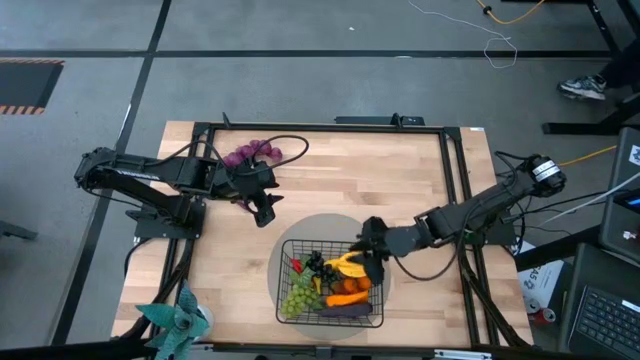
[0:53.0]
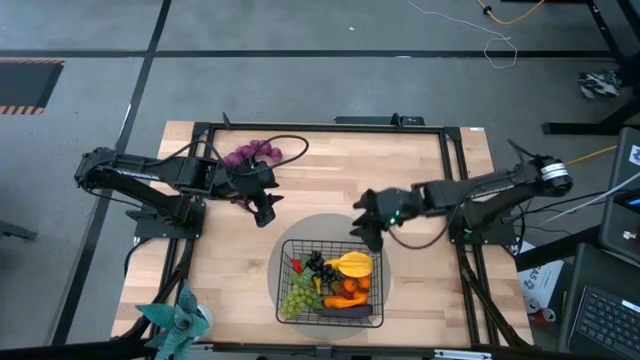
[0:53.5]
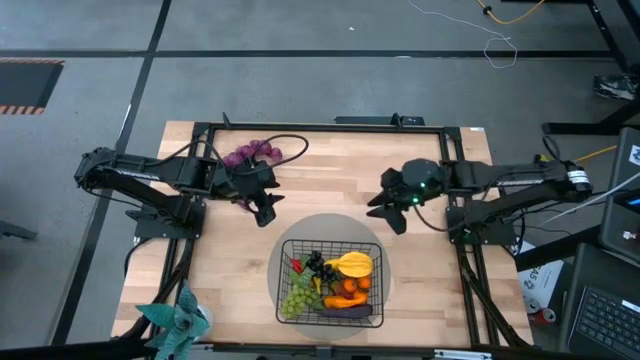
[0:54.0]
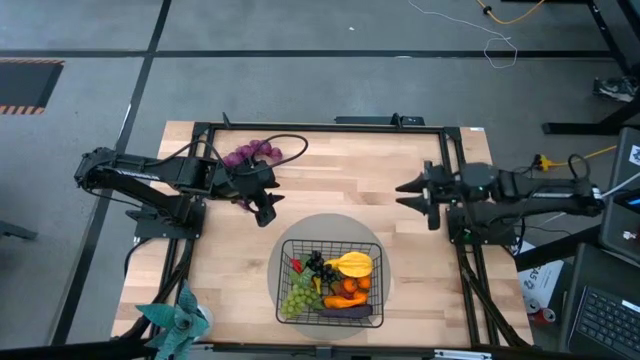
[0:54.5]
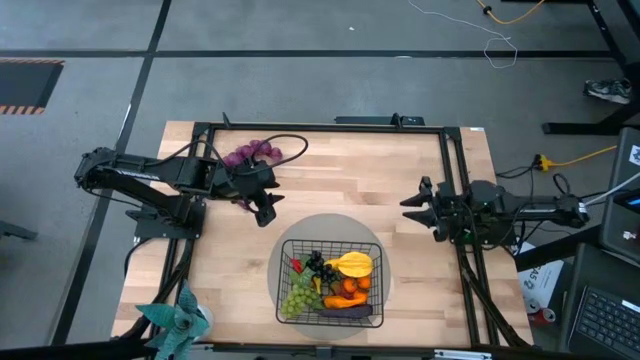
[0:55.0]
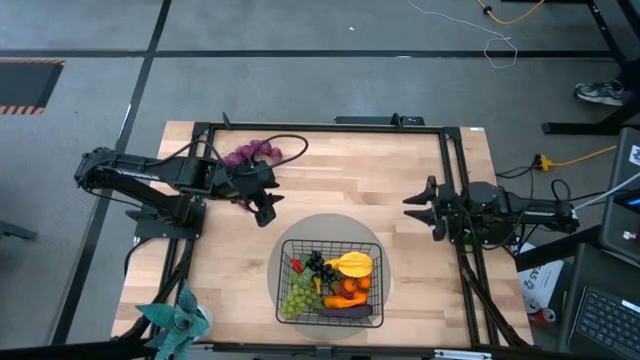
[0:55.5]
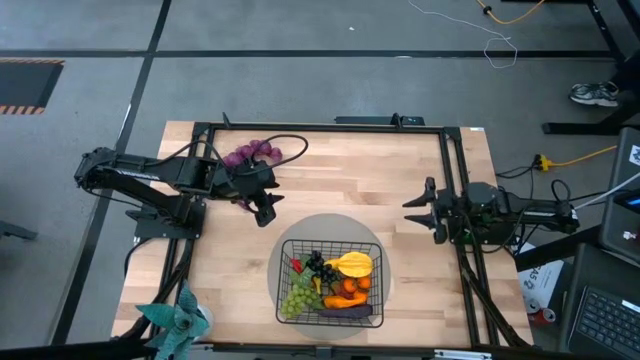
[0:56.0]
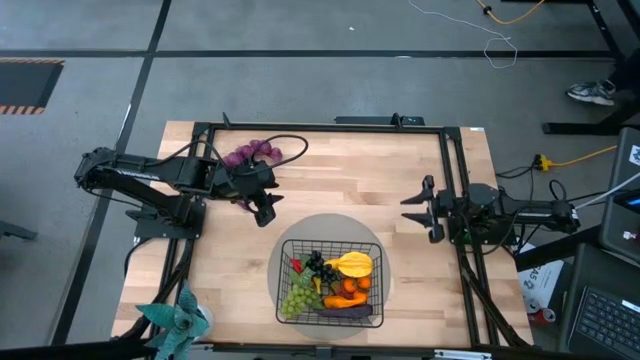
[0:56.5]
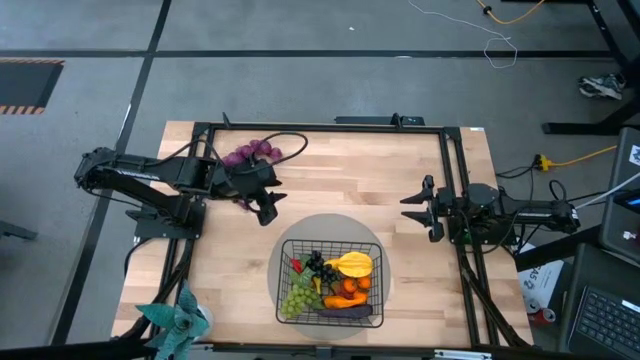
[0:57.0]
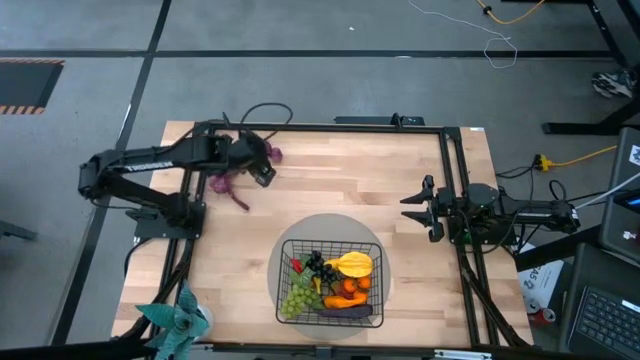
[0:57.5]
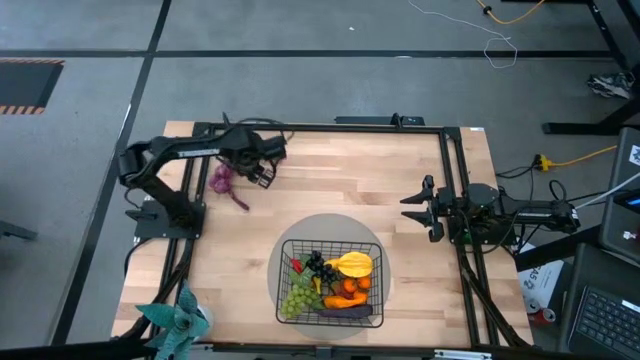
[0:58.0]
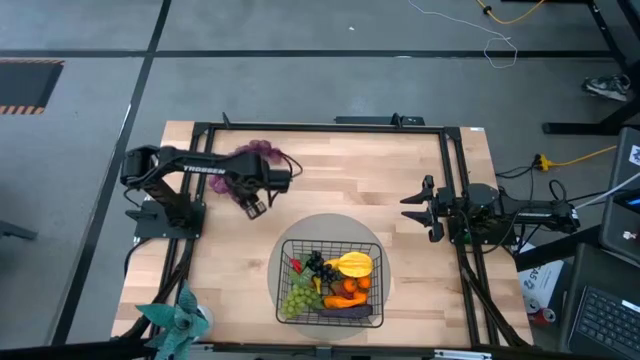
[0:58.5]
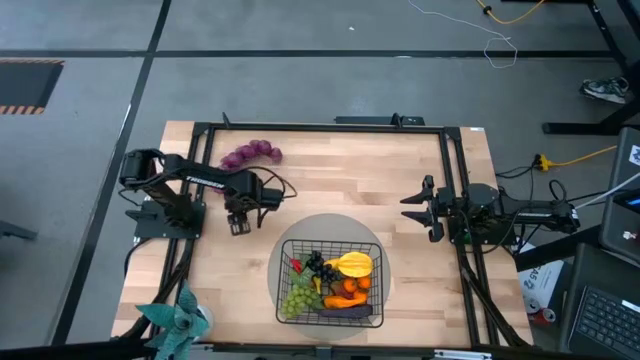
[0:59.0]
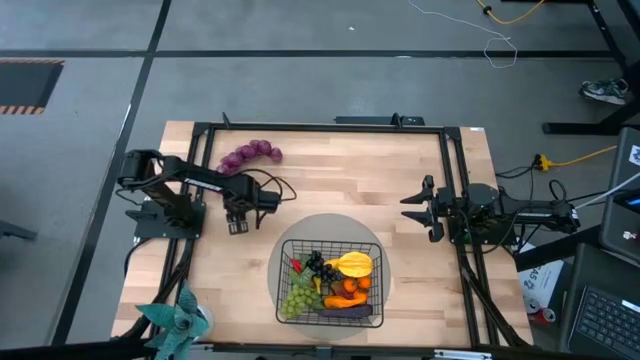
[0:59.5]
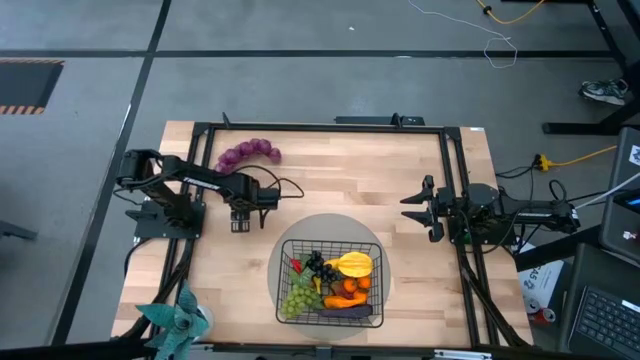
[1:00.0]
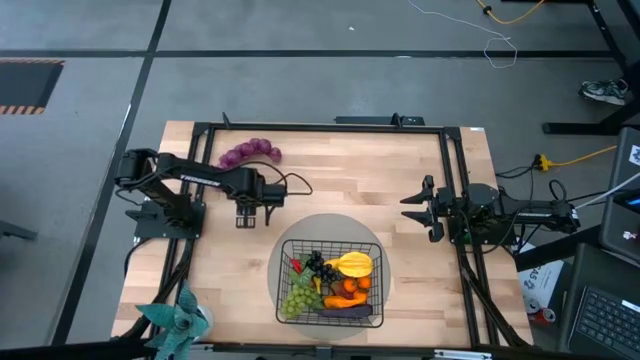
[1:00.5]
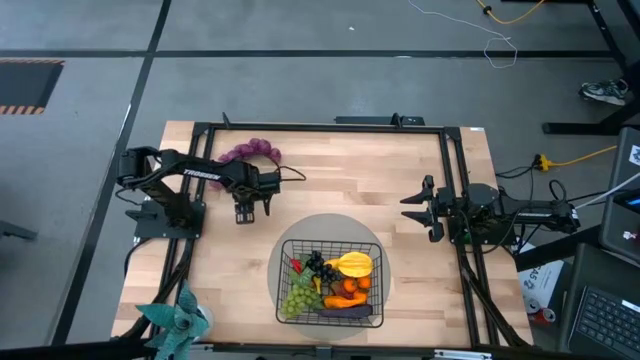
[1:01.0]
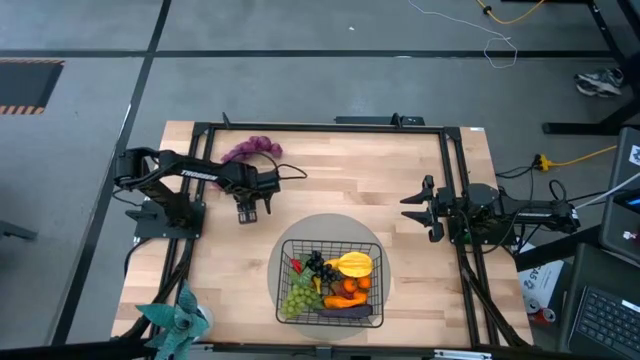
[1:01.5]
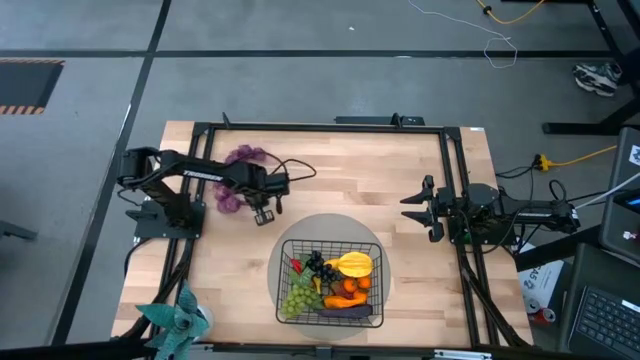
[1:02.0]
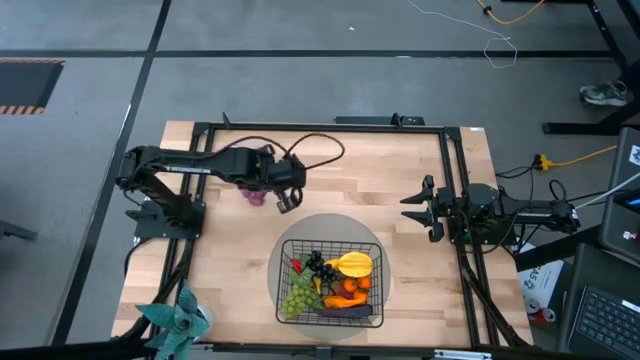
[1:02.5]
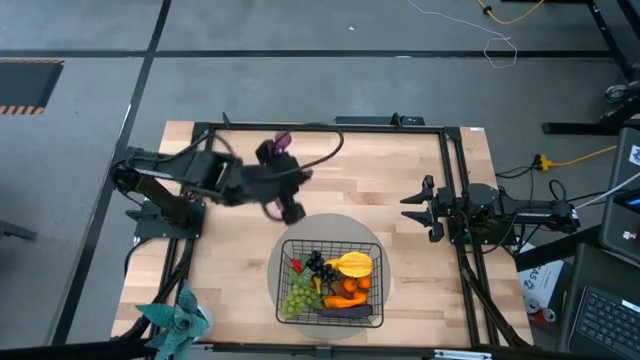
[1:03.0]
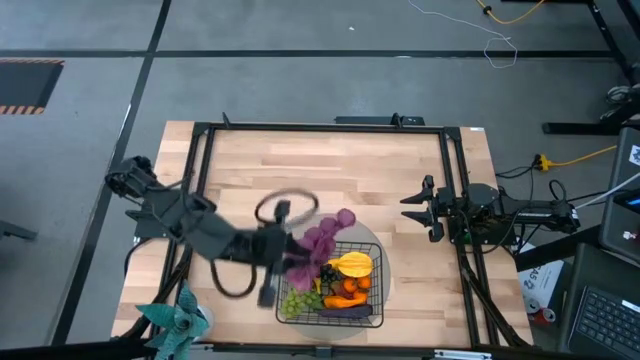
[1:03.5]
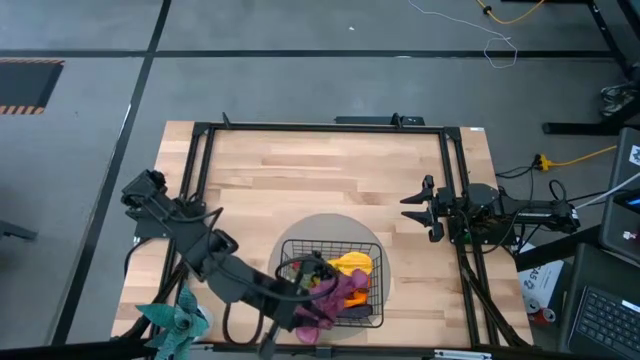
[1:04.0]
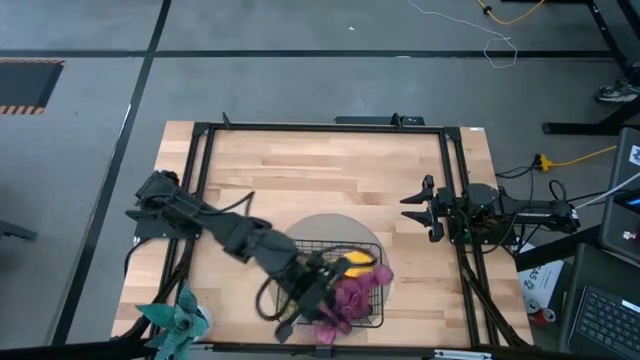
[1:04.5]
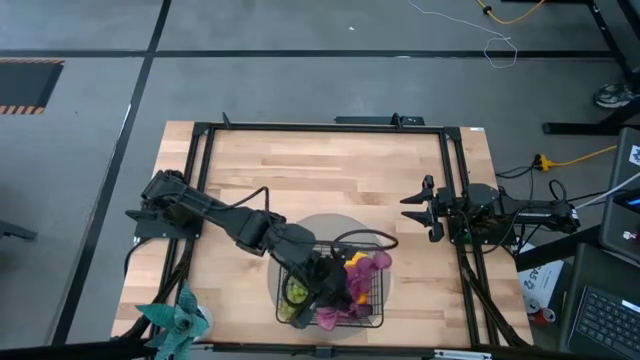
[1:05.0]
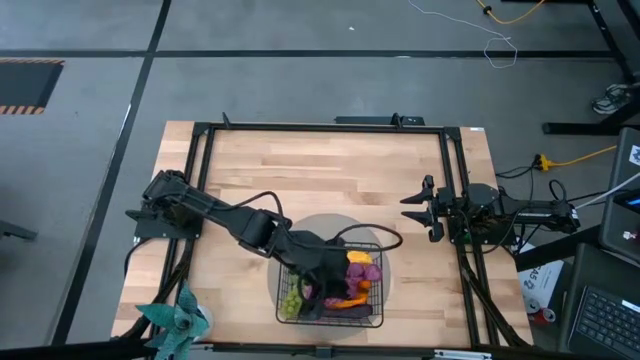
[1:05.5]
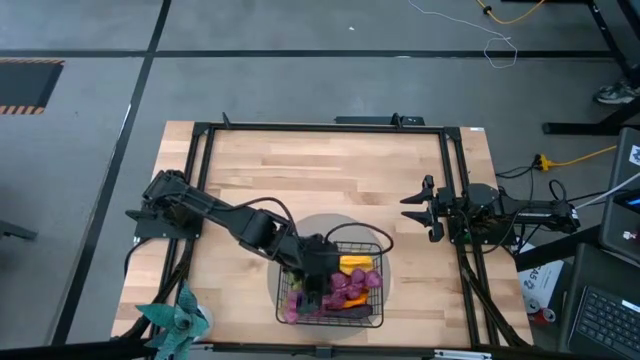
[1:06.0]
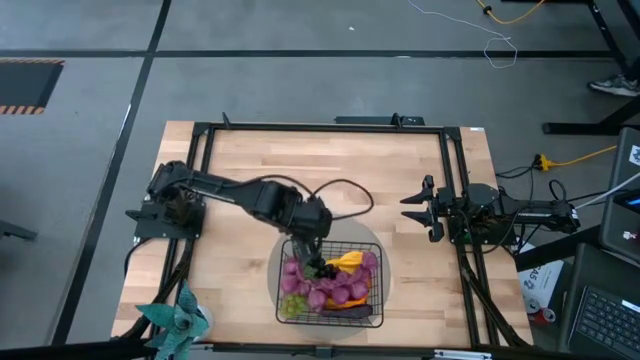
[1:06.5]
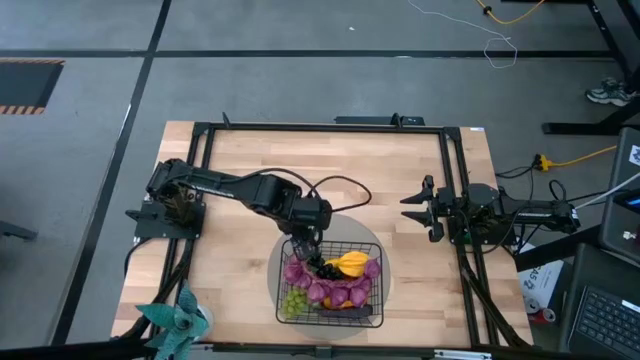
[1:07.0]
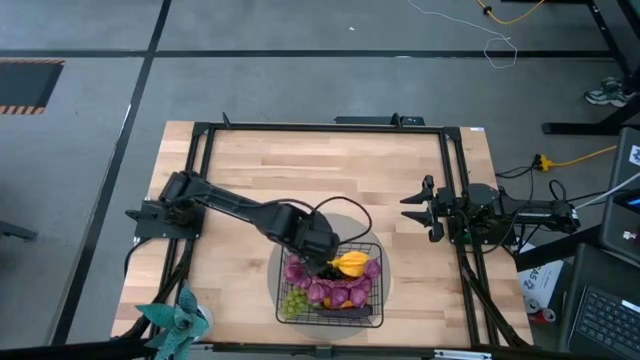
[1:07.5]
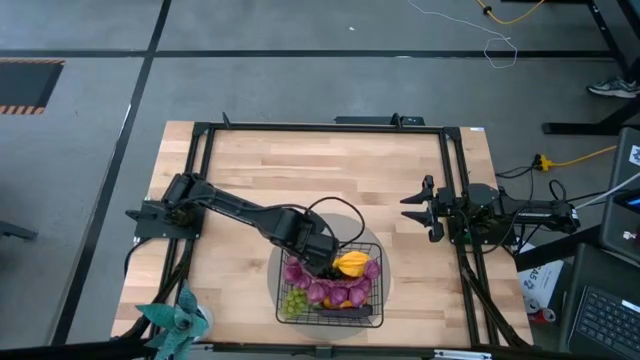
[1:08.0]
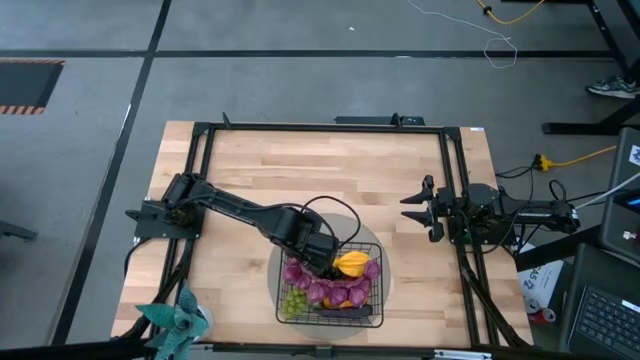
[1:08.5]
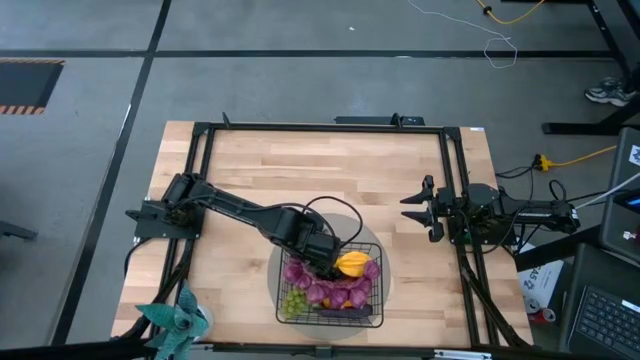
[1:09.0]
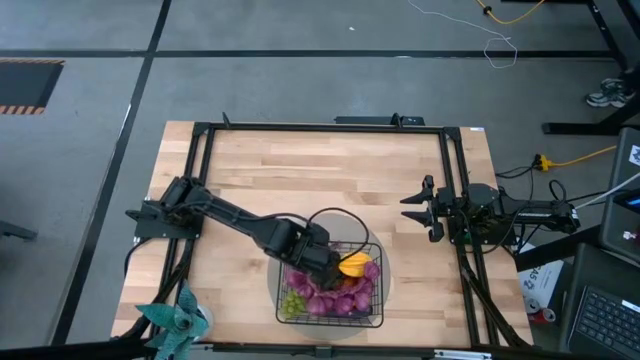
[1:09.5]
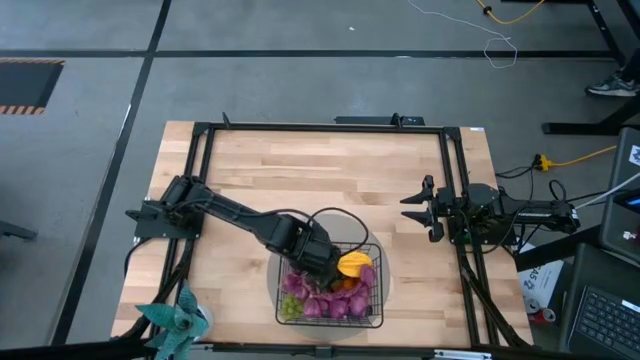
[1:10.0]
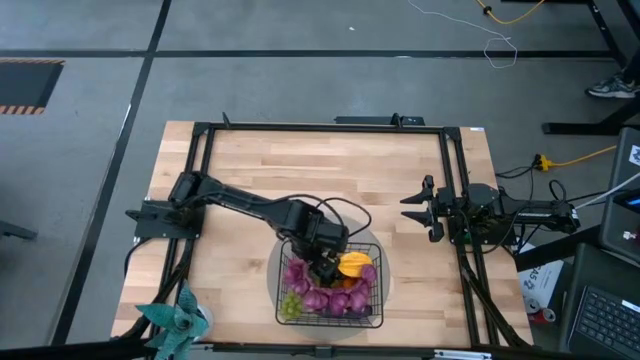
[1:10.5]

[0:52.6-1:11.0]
Task: Build produce basket
Put the purple garlic into the wire basket

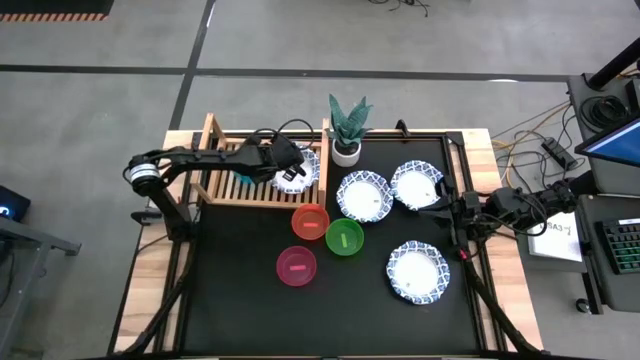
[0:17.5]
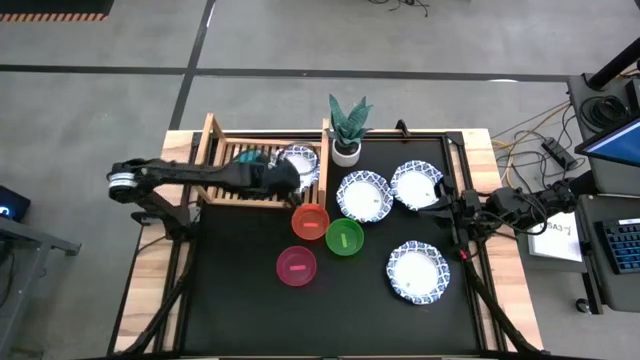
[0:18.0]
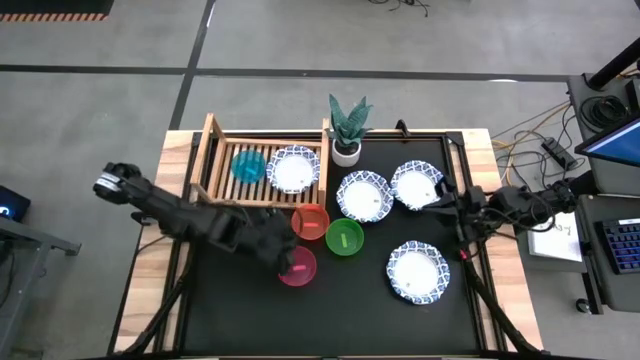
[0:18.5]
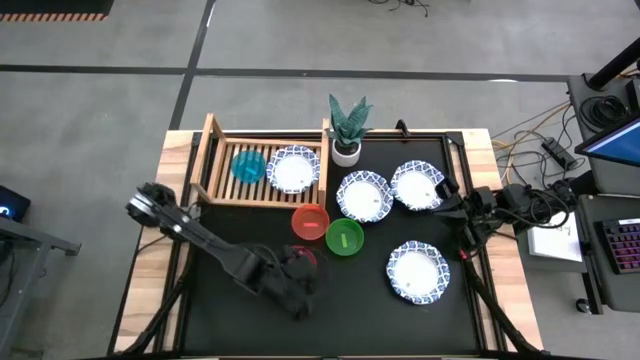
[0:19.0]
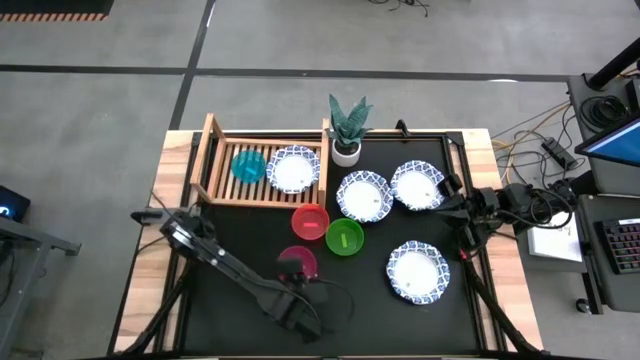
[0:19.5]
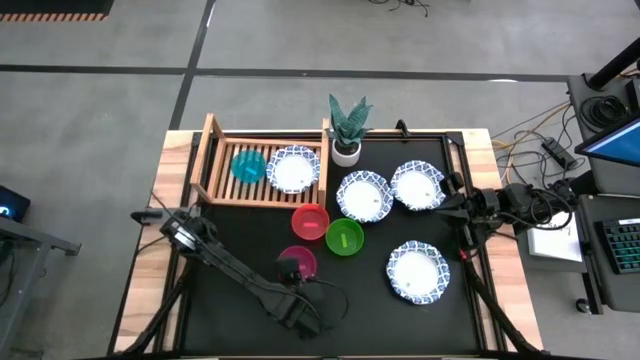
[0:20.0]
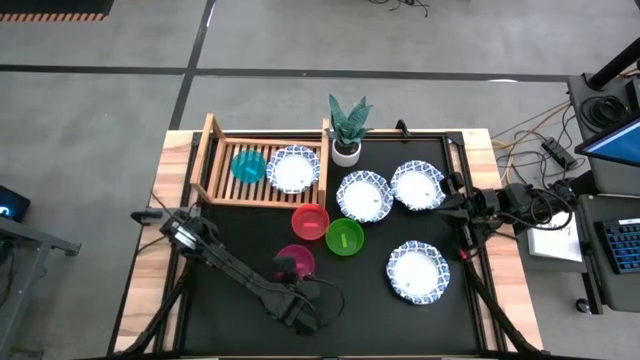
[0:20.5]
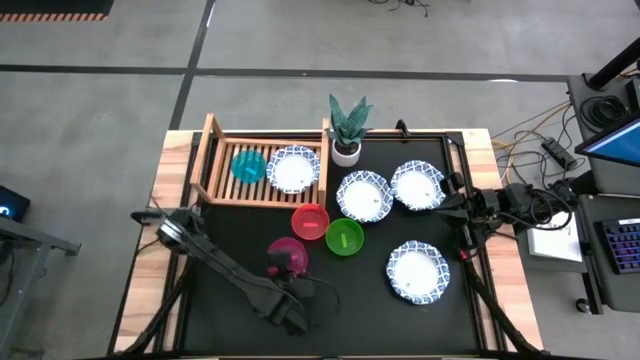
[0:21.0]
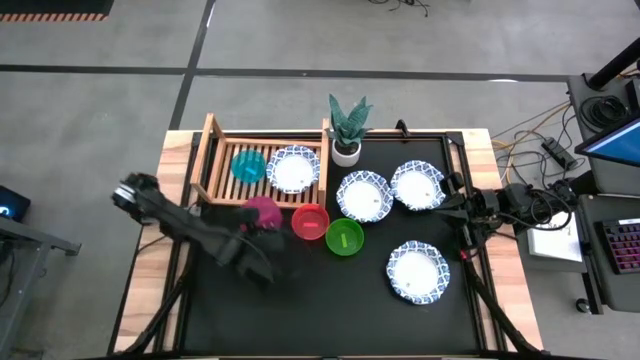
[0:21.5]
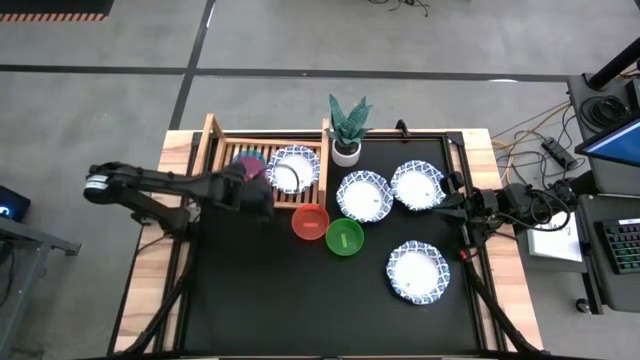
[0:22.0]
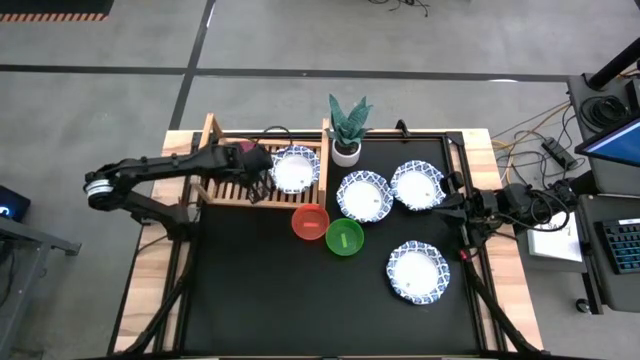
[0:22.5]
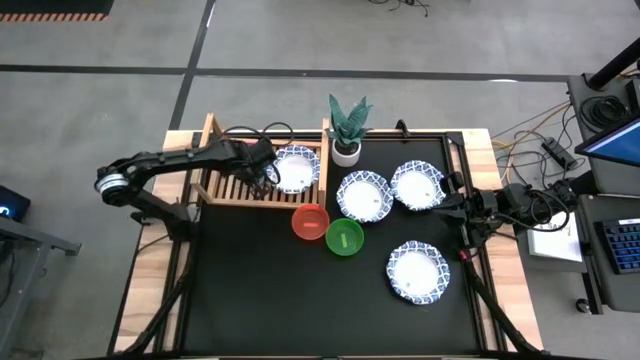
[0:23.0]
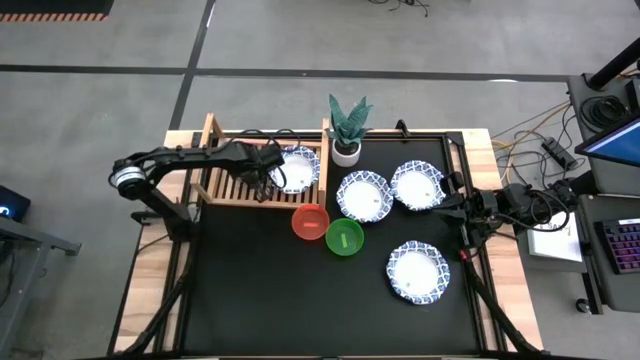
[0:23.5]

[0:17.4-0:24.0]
Task: Place and stack bowls onto a shelf
Stack the pink bowl on top of the blue bowl on the shelf
